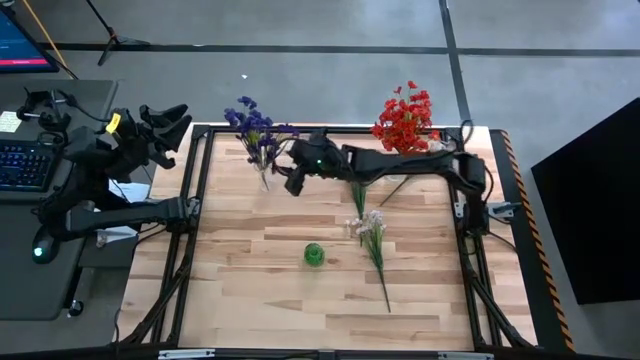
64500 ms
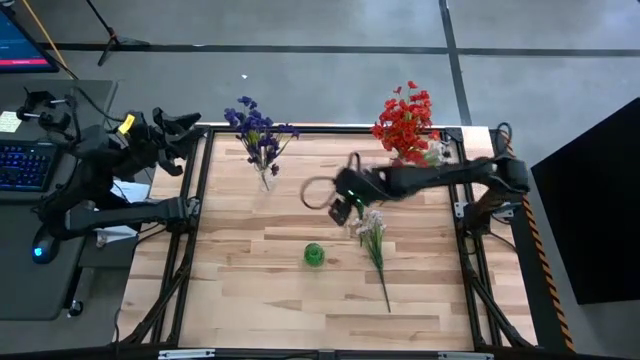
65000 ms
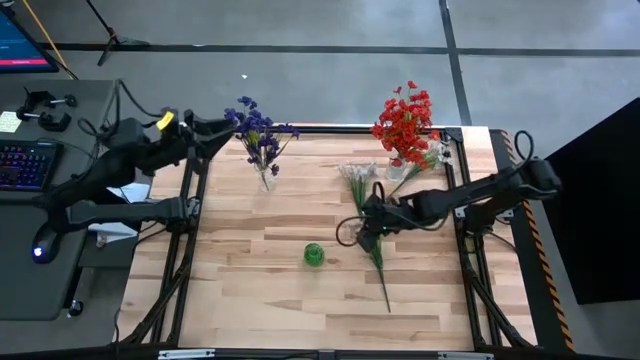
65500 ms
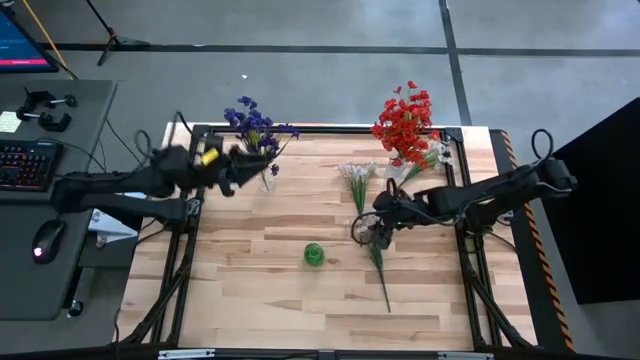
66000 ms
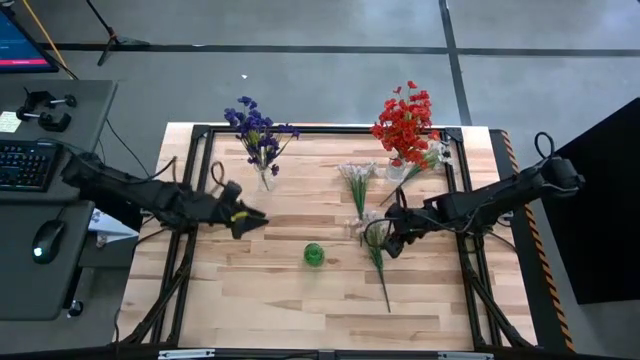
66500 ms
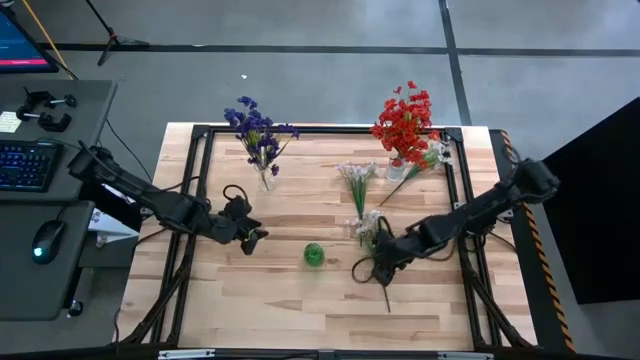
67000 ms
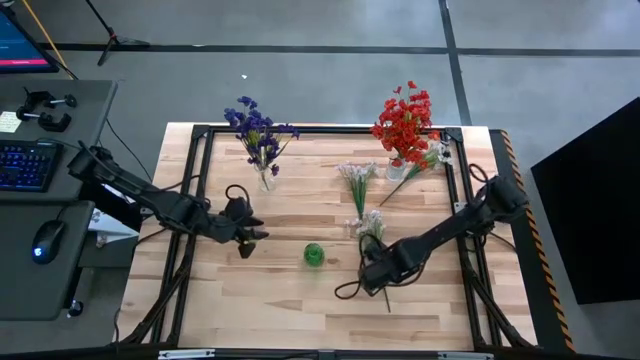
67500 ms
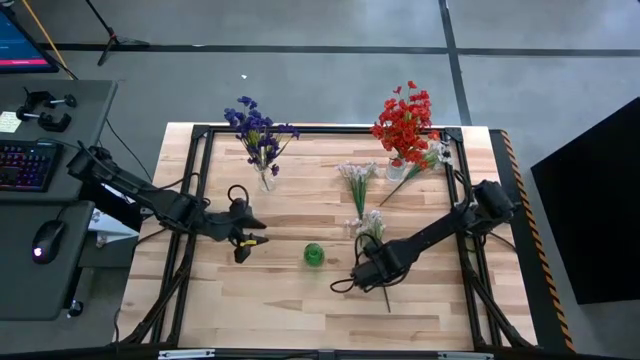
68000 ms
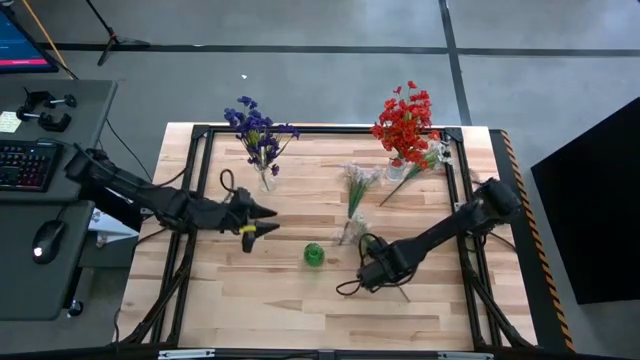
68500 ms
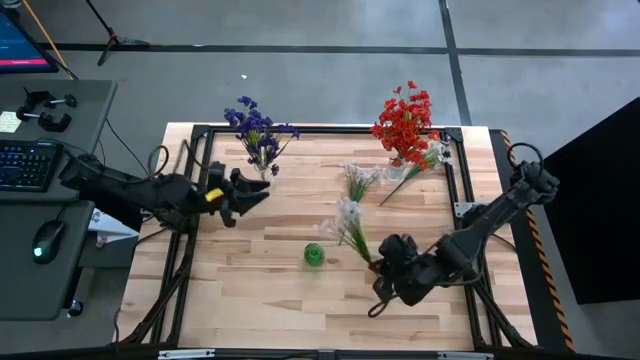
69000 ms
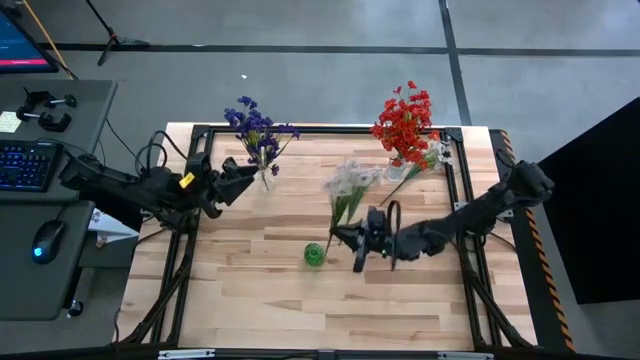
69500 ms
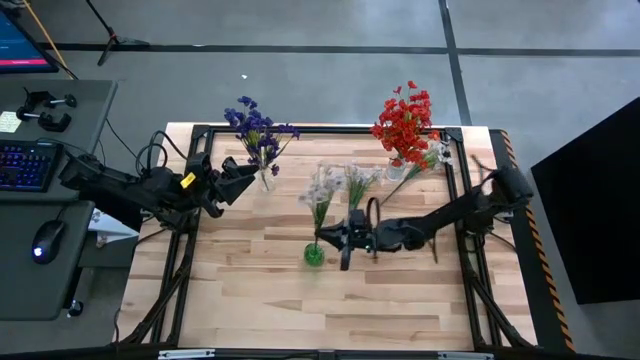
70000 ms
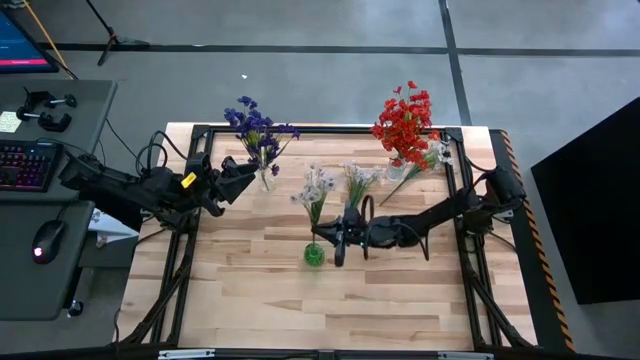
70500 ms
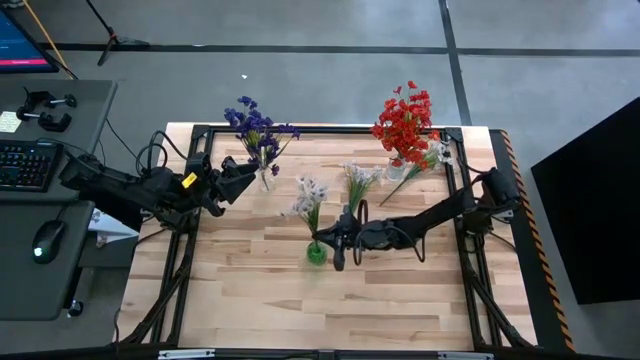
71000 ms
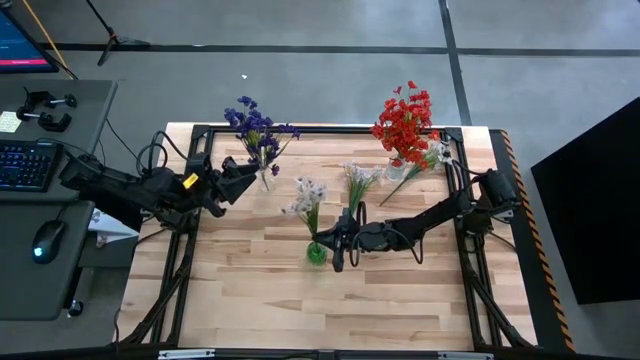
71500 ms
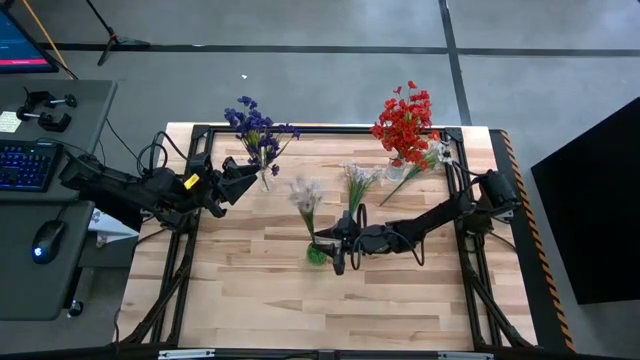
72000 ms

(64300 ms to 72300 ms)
Task: Sort flowers into vase by color
Put the bottom right white flowers into the green flower vase

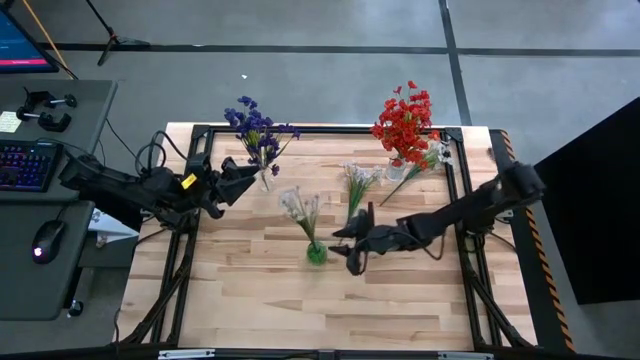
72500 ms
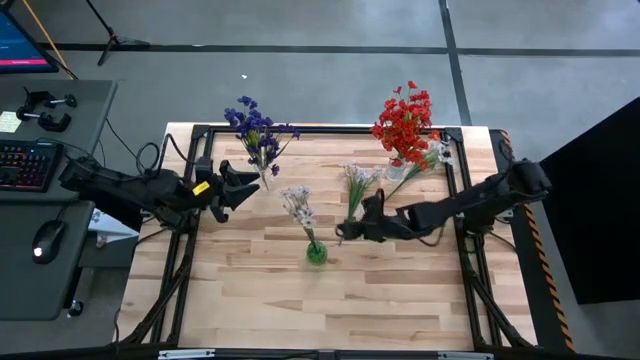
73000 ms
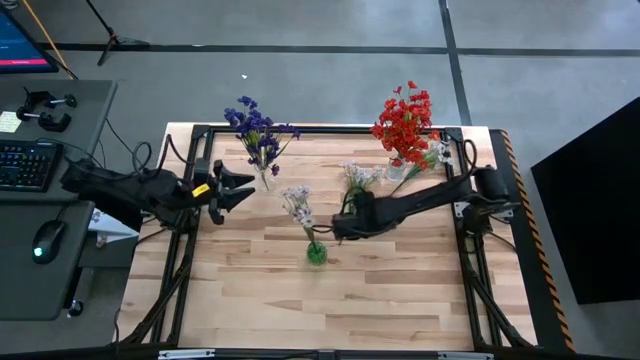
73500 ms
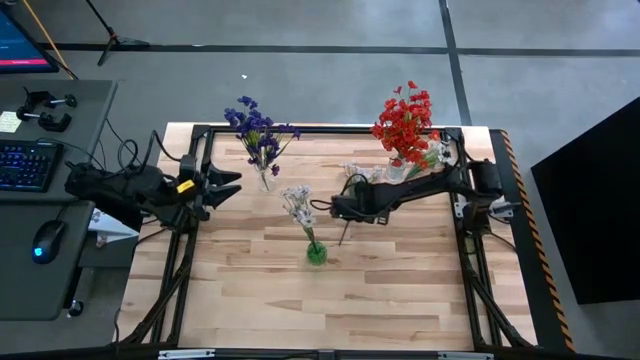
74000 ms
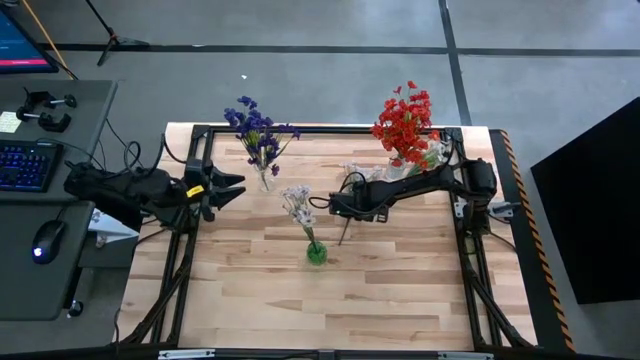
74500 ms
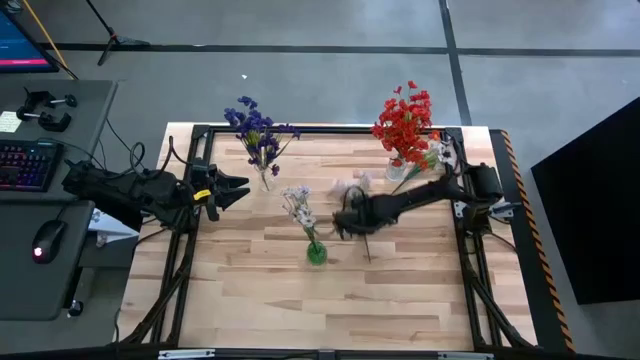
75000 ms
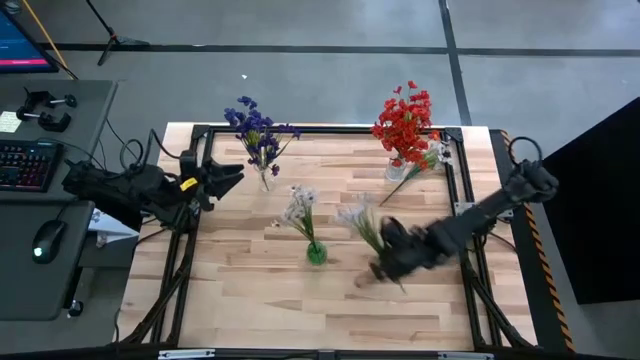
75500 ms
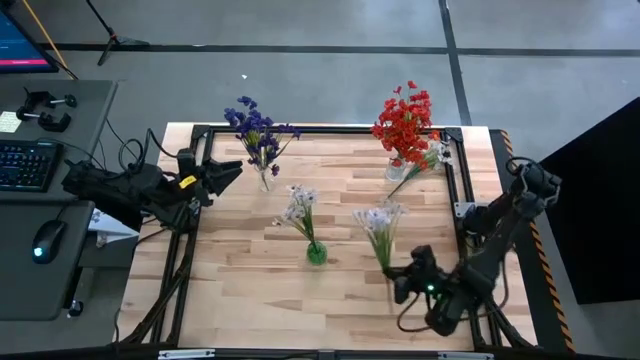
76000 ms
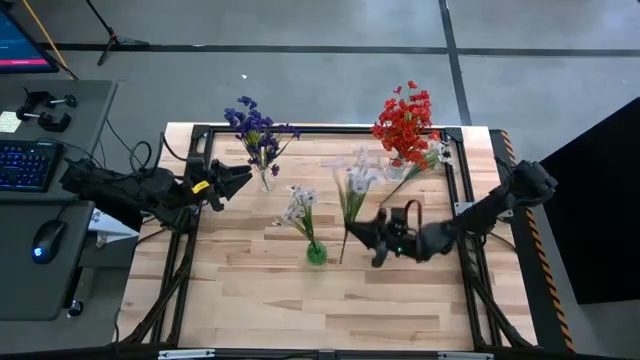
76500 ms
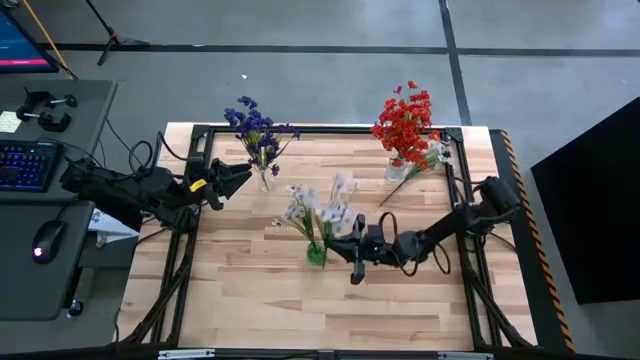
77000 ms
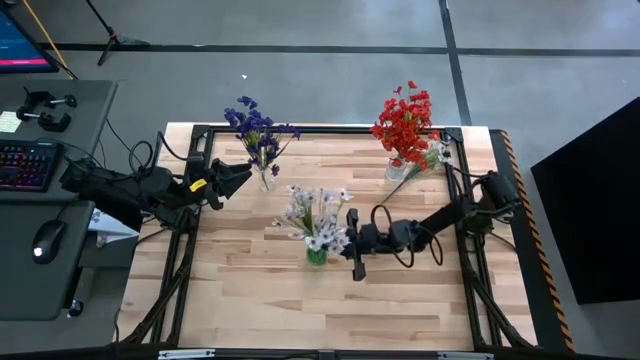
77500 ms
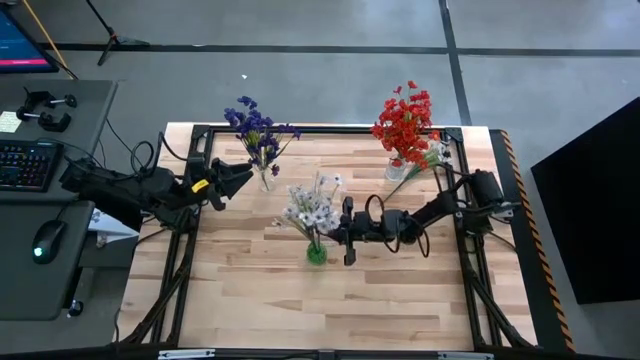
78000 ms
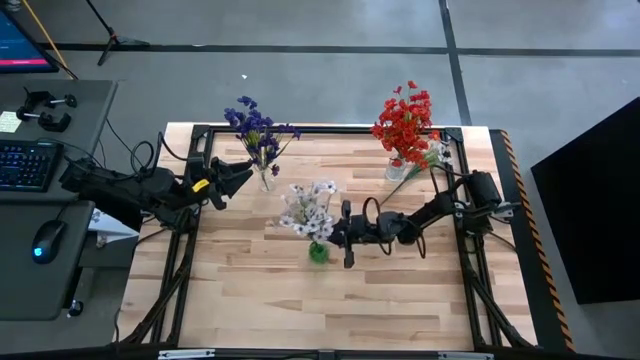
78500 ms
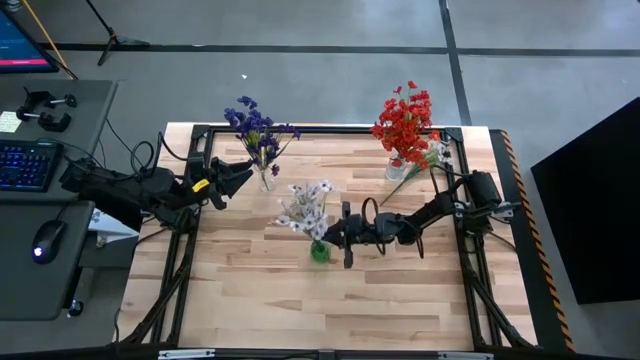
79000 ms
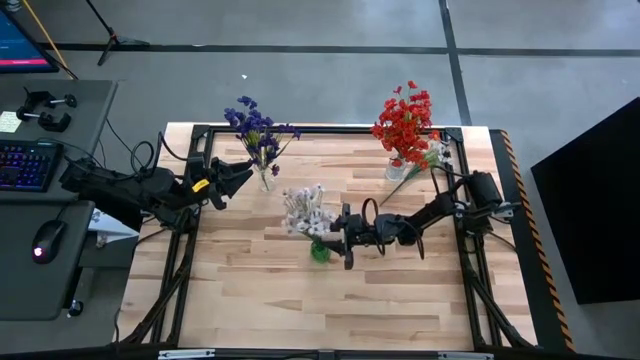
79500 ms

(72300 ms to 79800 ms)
Put the left white flowers into the green flower vase

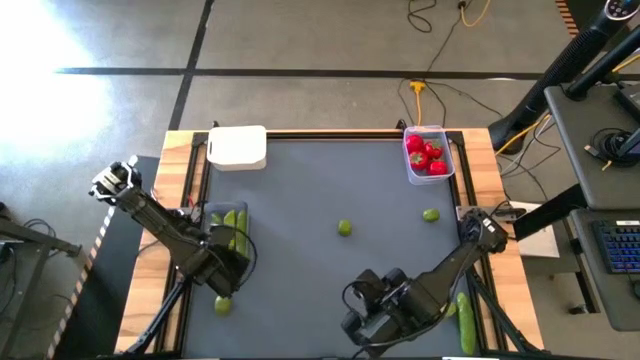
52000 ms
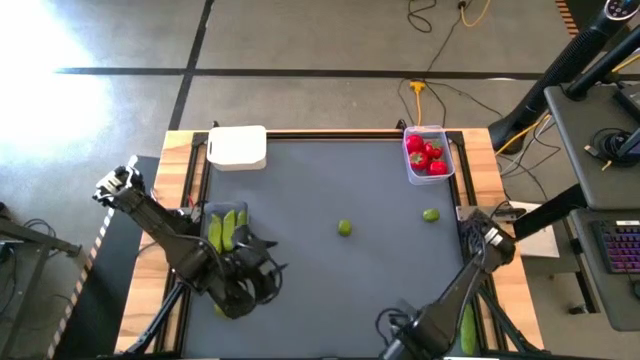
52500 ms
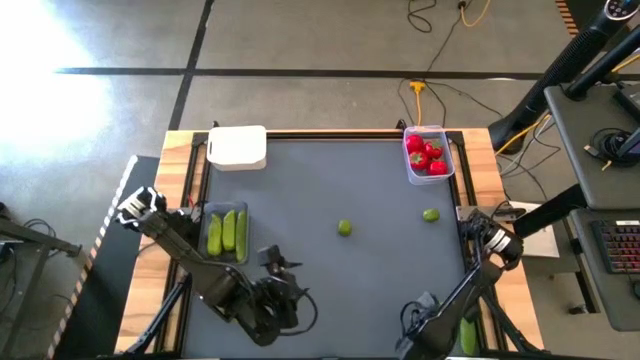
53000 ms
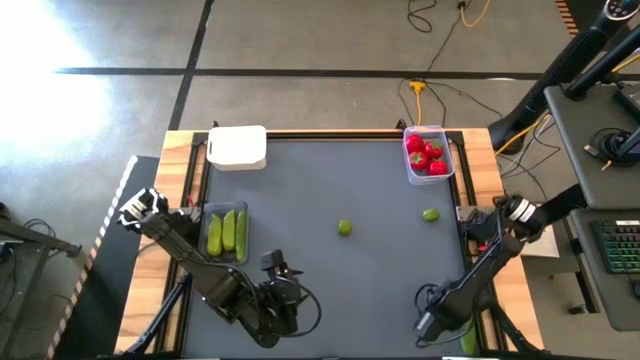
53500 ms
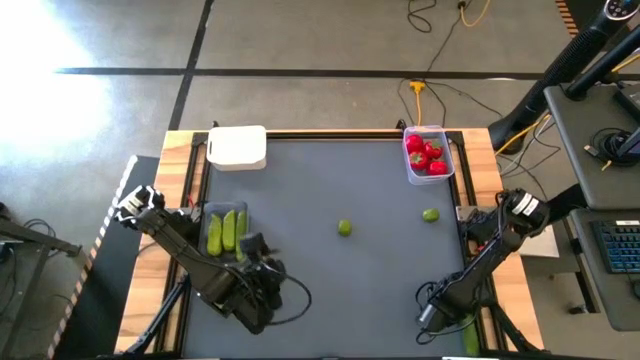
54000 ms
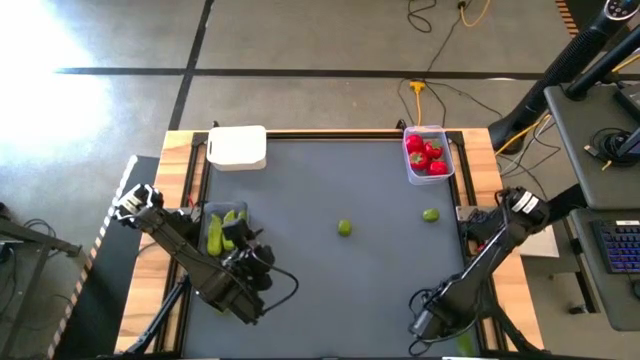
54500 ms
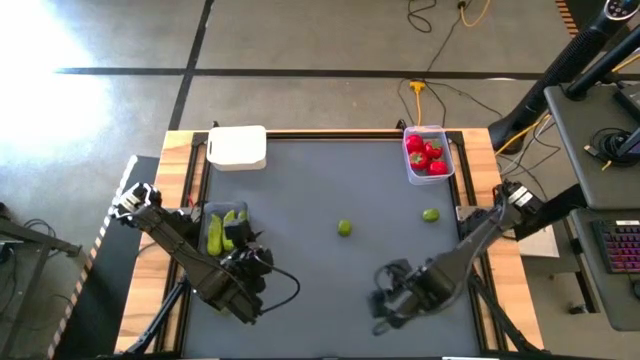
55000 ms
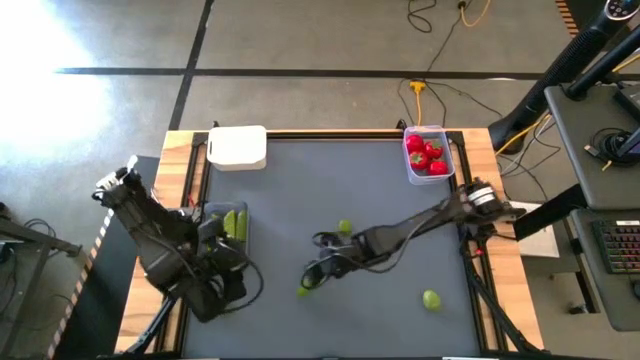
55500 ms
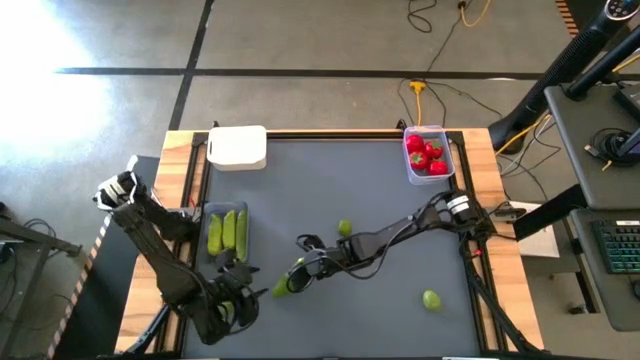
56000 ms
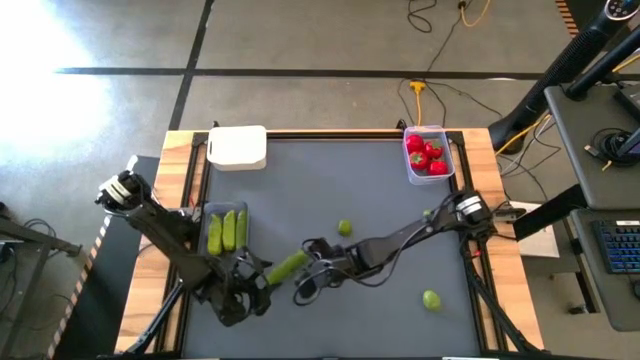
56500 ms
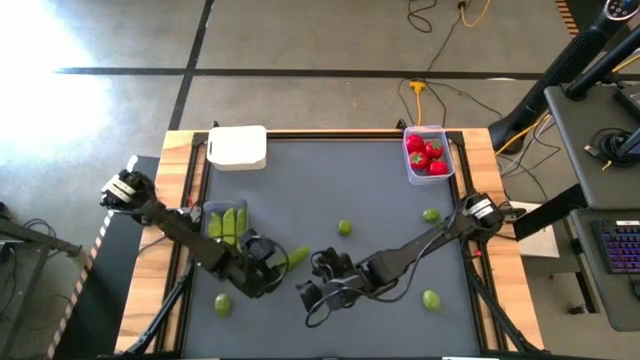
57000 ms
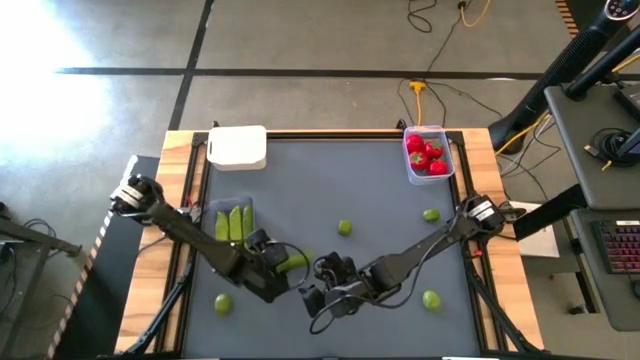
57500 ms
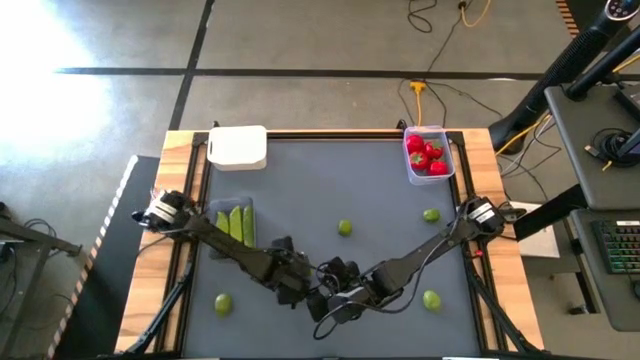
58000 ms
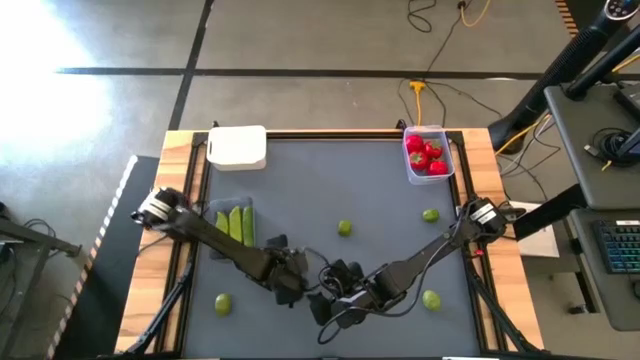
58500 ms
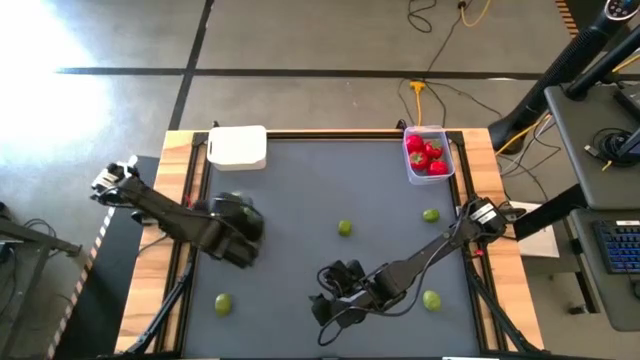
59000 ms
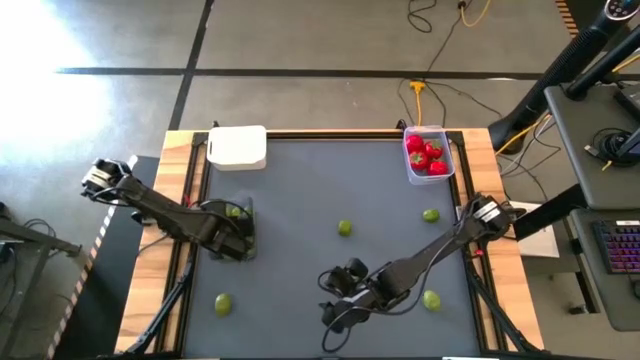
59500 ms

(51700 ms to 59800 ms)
Task: Sort produce into baskets
Put the green cucumber into the black bin
